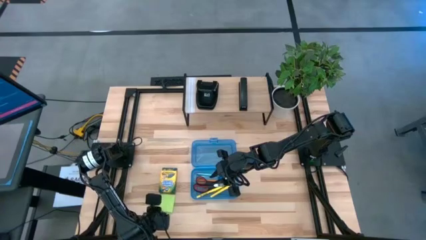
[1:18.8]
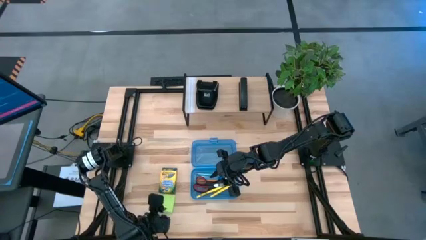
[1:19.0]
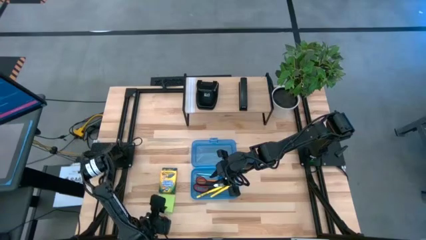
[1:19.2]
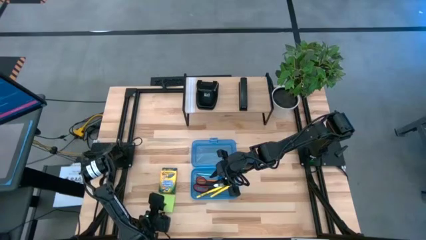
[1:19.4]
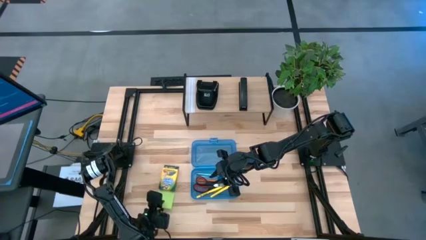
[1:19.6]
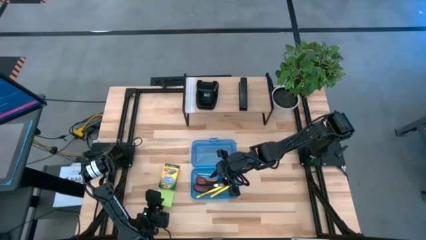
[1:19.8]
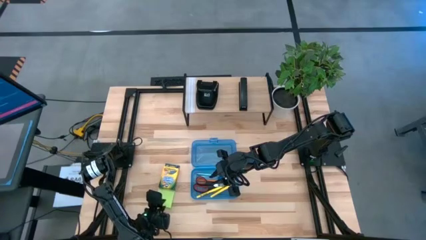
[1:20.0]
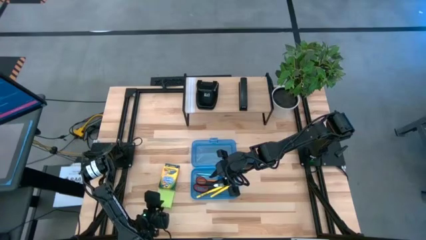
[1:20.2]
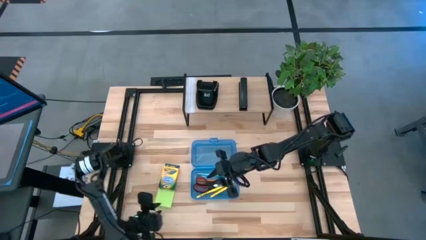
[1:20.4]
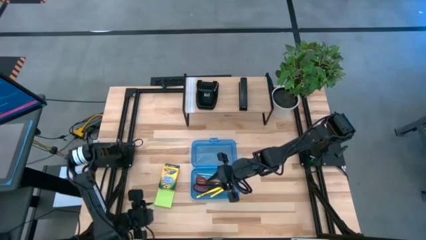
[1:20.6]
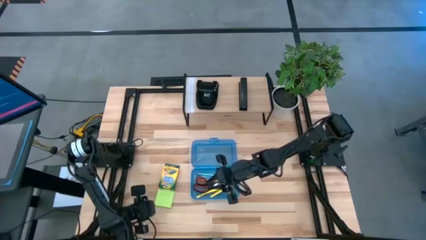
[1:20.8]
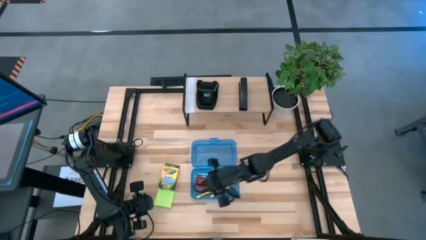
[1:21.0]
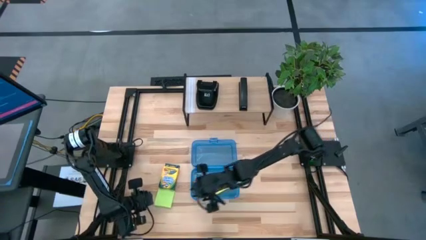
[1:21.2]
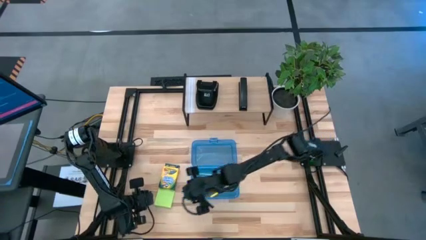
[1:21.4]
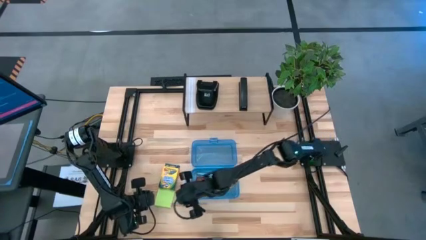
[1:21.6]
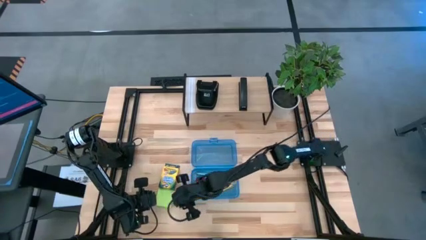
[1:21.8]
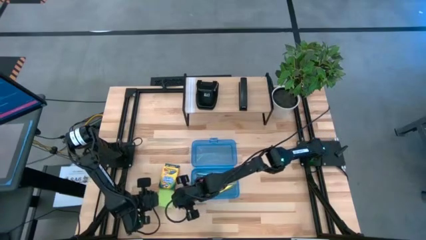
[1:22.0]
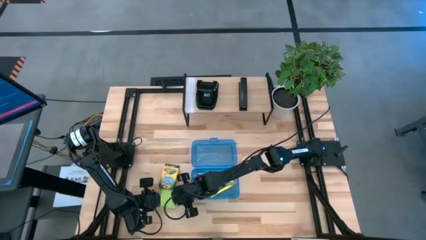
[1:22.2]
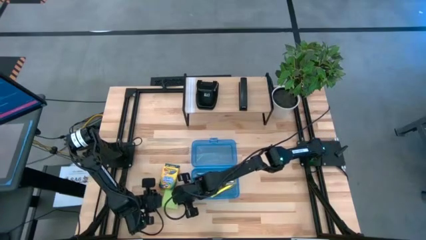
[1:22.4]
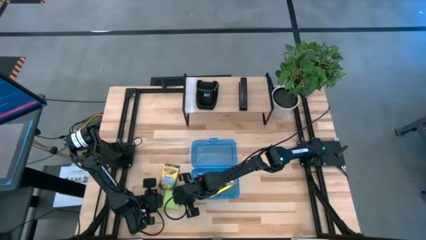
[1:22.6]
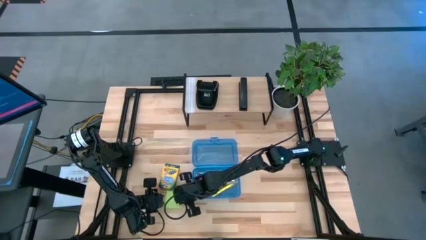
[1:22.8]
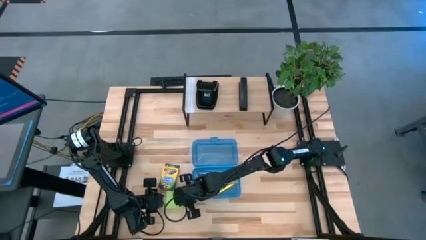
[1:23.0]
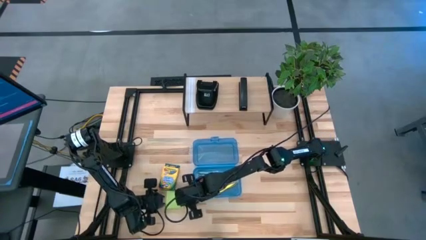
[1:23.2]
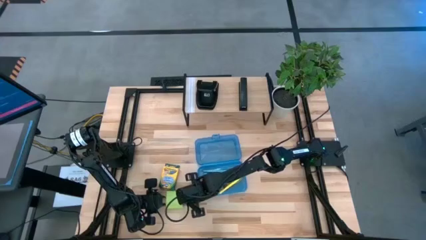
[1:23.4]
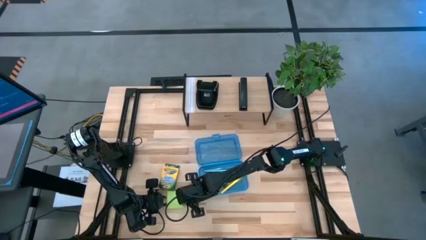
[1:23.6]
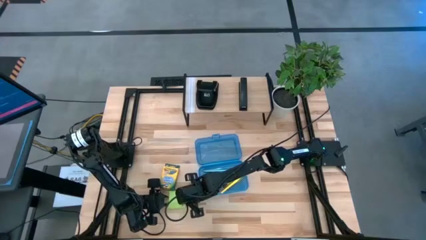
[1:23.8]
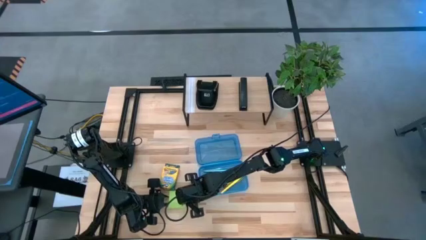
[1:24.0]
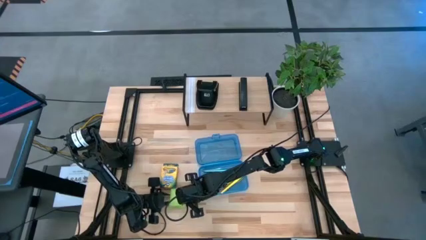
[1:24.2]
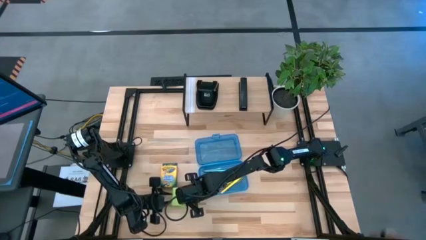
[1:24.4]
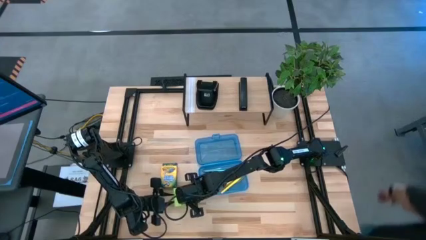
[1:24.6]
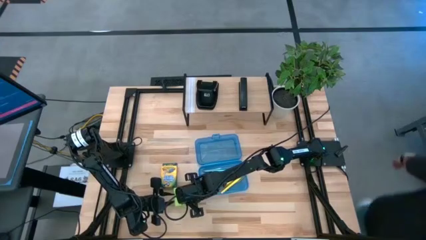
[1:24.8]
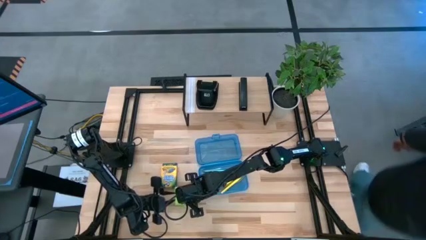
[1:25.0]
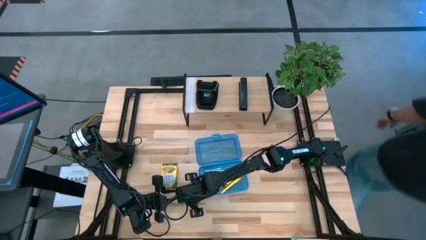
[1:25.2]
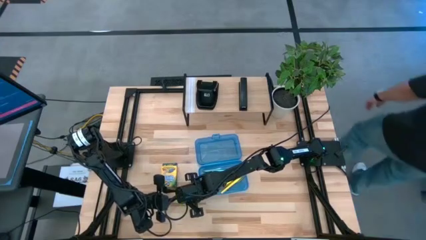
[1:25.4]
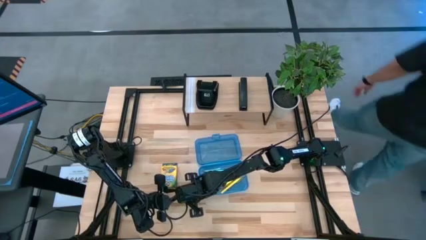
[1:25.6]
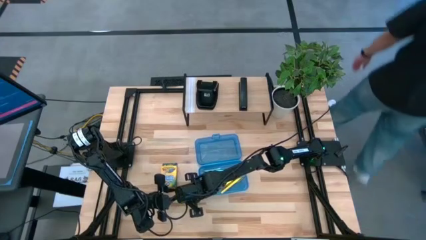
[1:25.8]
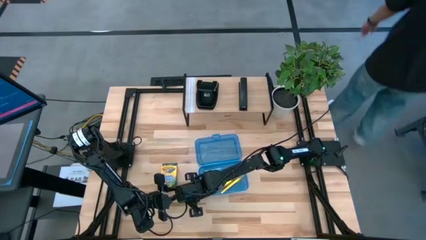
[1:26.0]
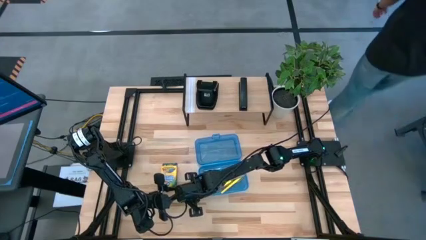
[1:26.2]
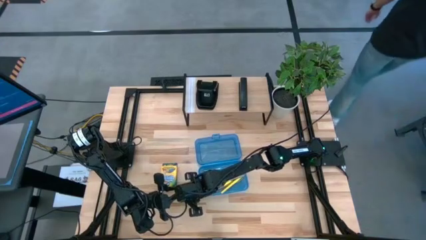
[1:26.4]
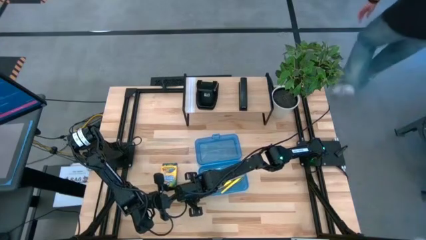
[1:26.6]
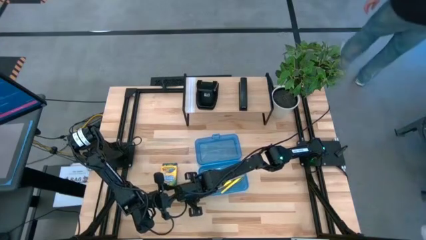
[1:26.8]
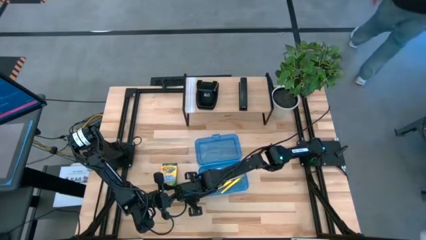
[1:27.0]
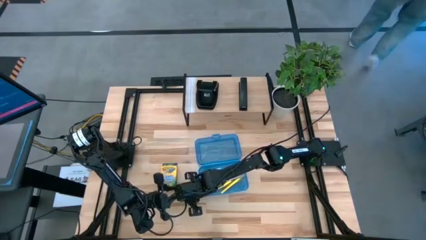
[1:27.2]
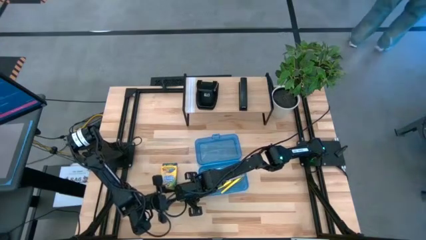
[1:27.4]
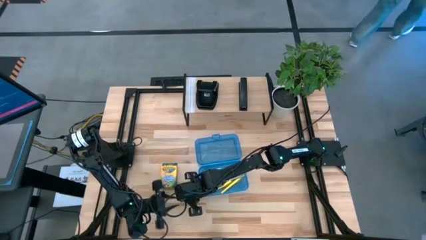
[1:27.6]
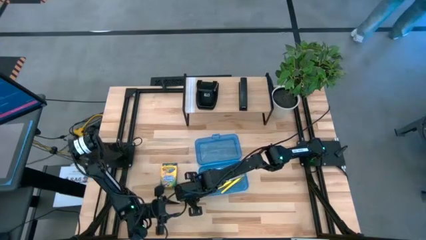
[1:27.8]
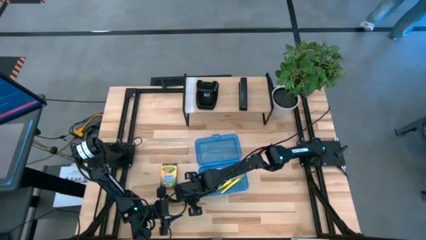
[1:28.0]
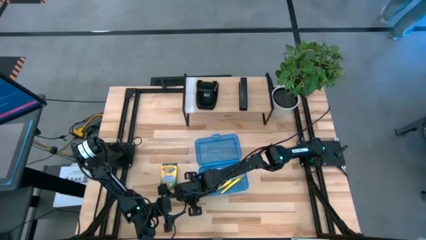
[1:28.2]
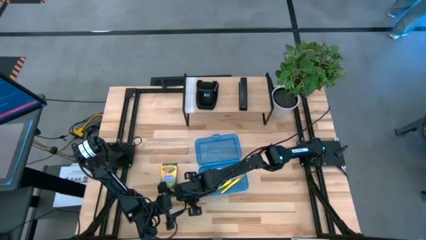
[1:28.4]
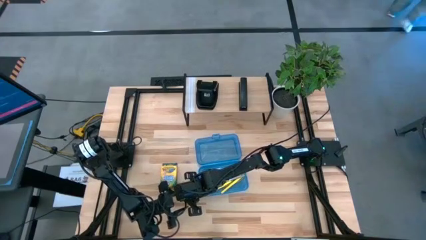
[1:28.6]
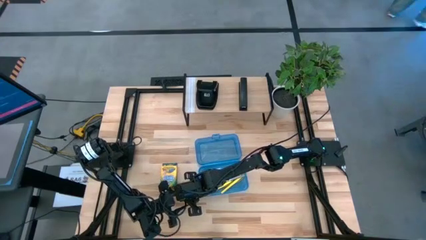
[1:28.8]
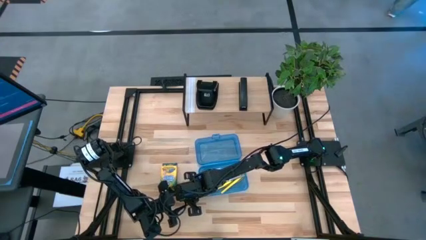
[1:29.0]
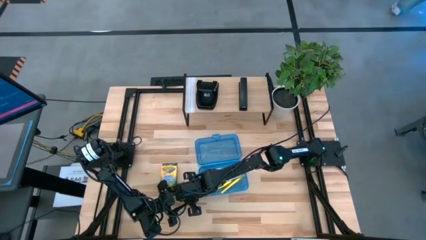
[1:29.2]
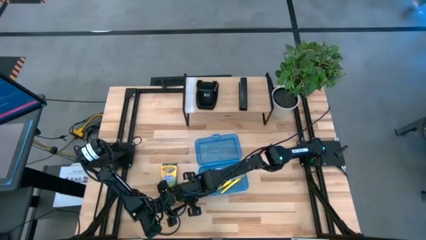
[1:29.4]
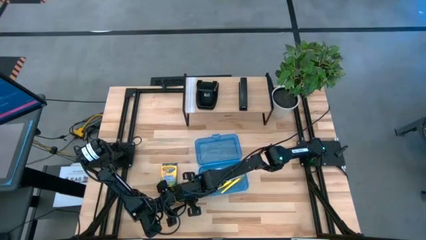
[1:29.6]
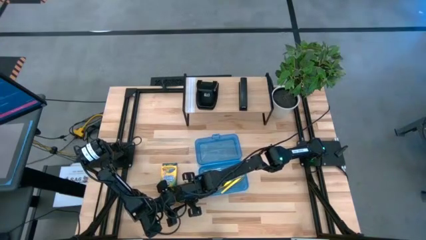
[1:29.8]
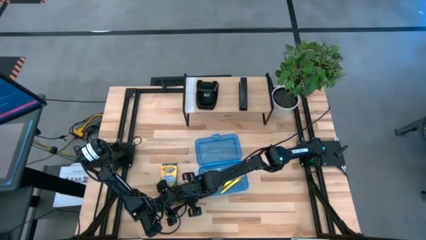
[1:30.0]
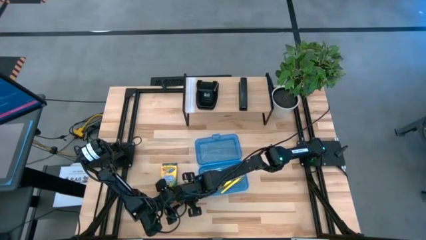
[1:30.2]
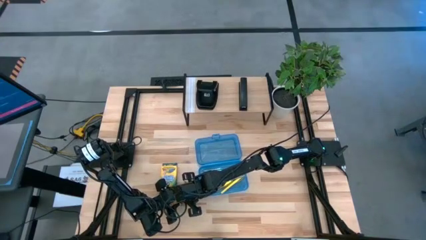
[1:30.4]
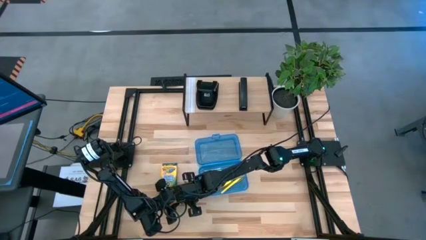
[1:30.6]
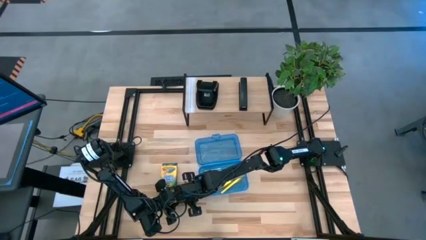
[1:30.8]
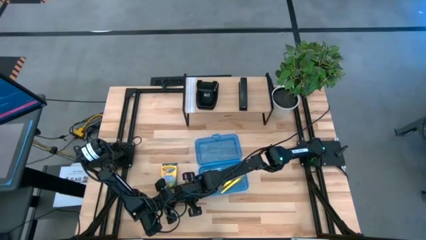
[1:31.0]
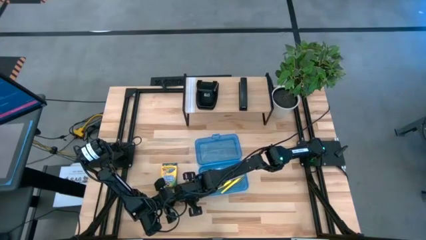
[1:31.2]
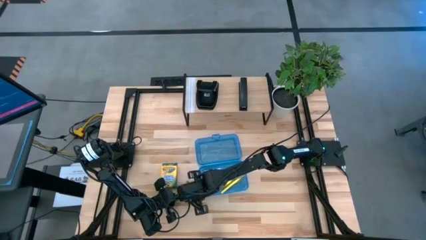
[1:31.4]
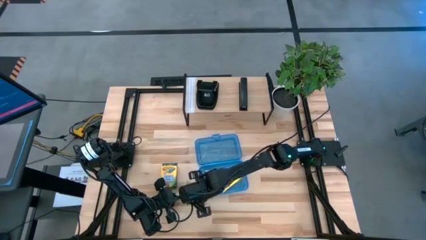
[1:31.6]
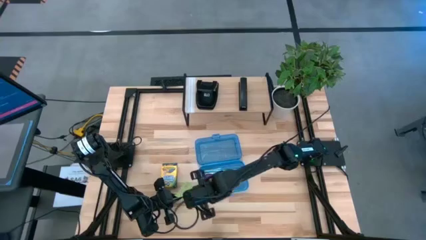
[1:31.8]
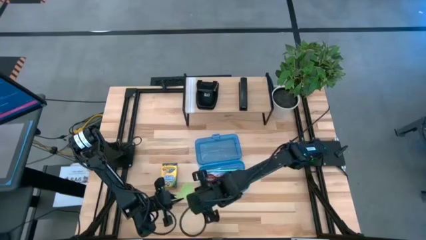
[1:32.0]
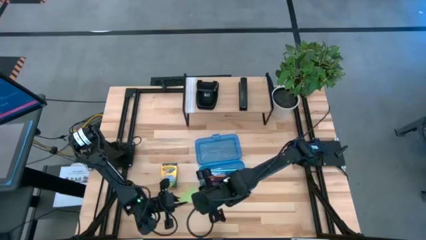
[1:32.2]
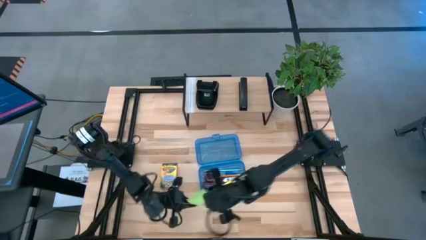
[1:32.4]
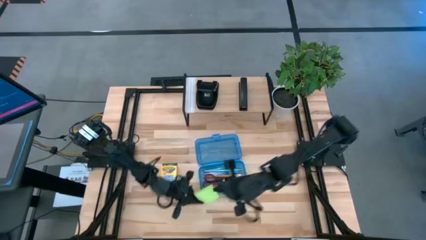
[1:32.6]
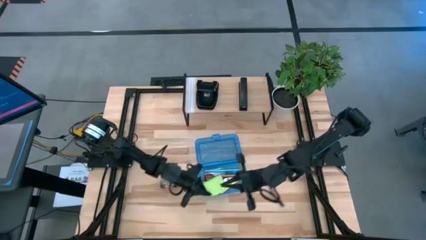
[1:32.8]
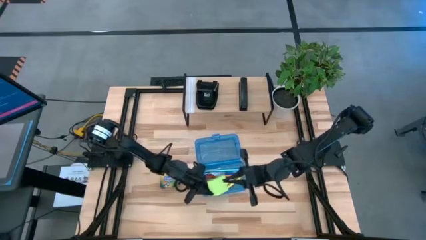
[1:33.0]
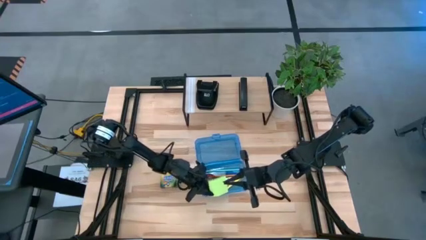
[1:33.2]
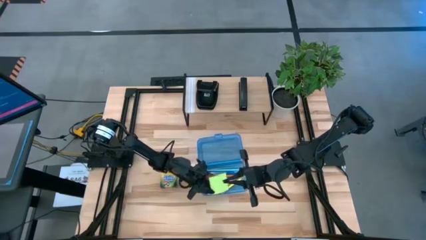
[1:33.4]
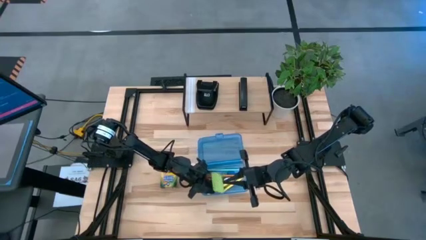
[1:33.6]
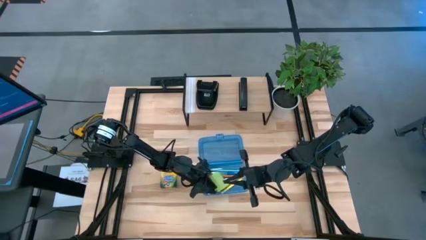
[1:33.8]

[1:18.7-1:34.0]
Task: Pack school essentials
Put the green sticky notes into the blue supply box
